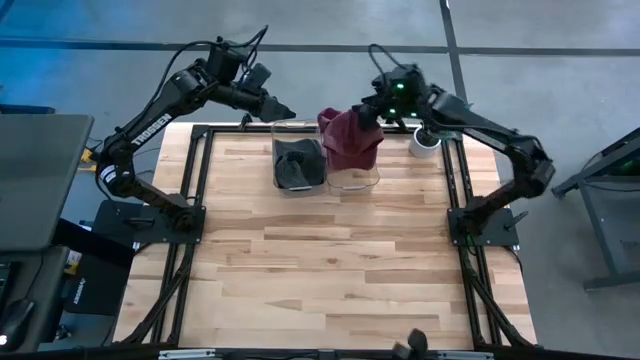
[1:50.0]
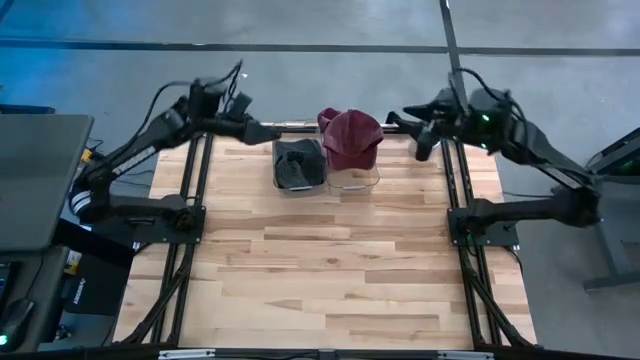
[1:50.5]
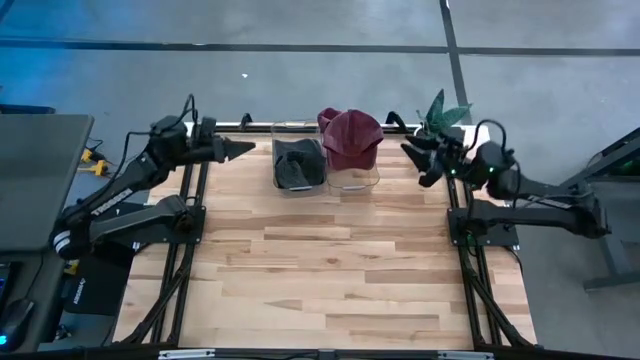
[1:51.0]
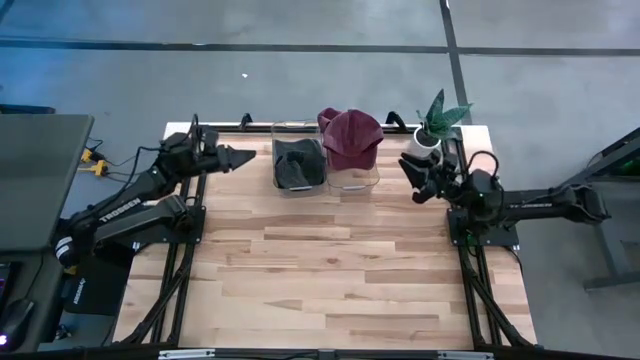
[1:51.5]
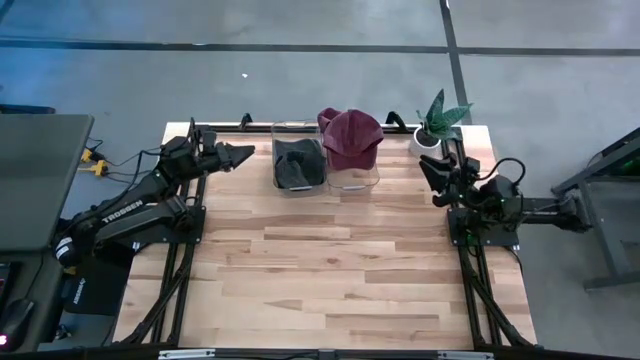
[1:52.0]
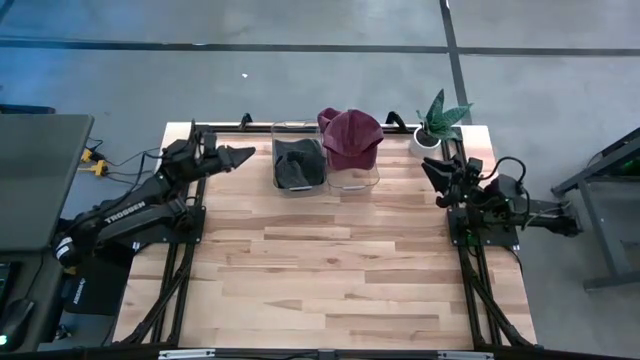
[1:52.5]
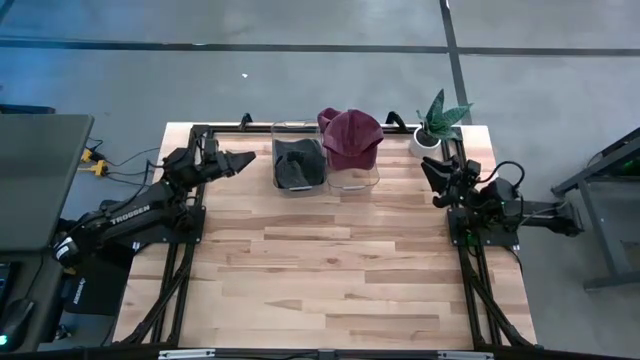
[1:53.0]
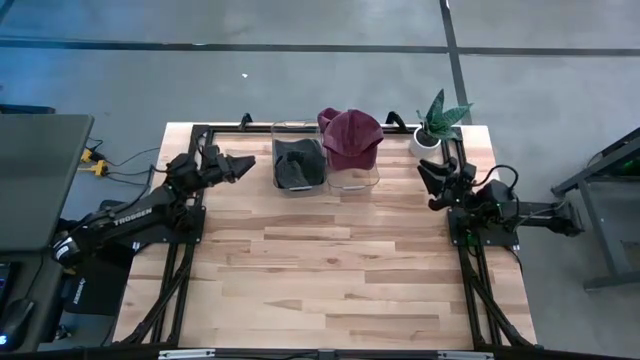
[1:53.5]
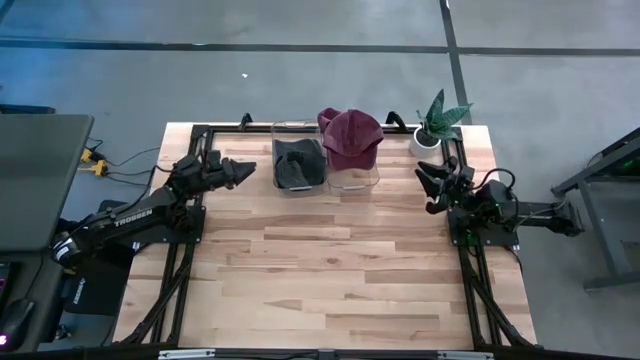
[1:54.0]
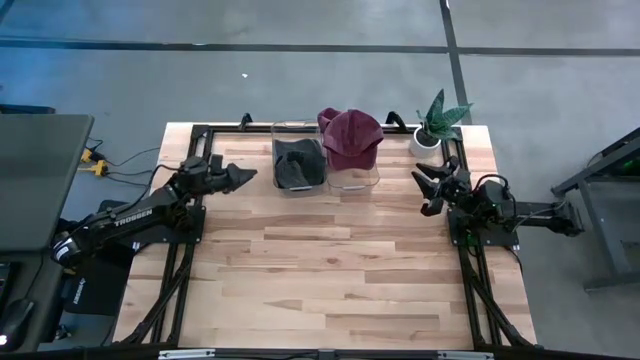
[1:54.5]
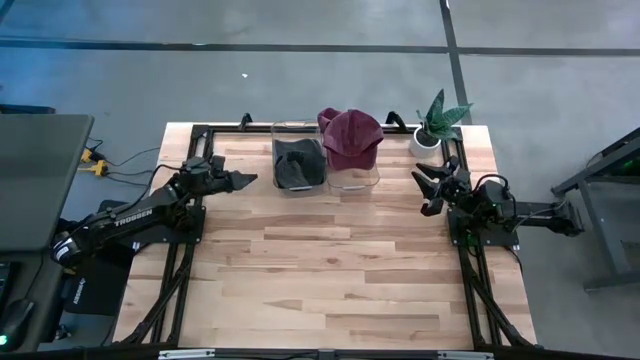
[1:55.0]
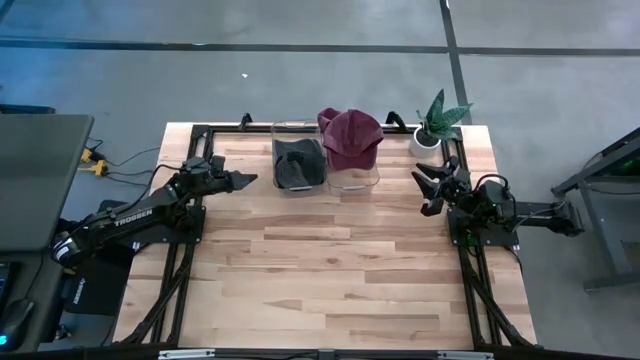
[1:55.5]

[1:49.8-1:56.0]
Task: Pick & Place hat
Return to home position

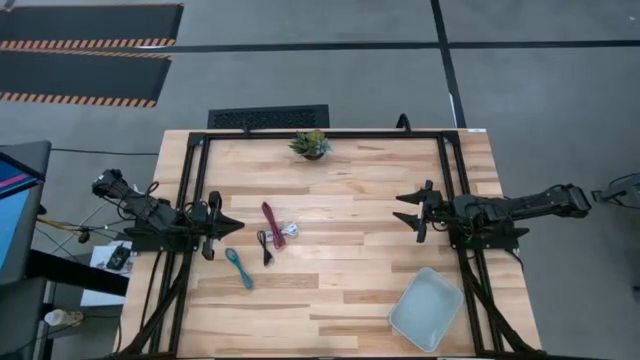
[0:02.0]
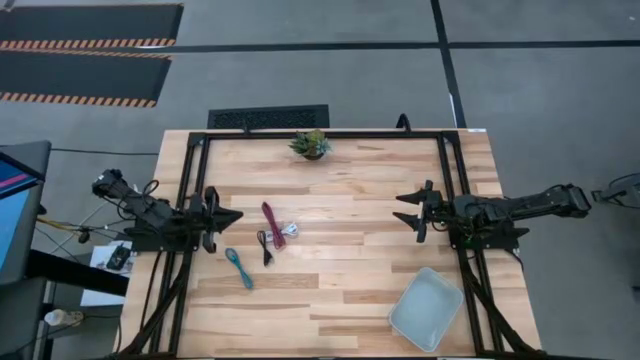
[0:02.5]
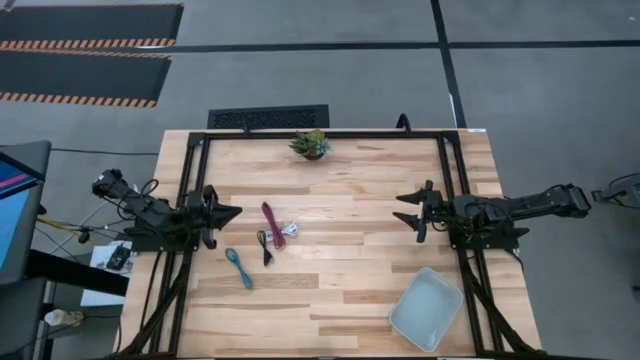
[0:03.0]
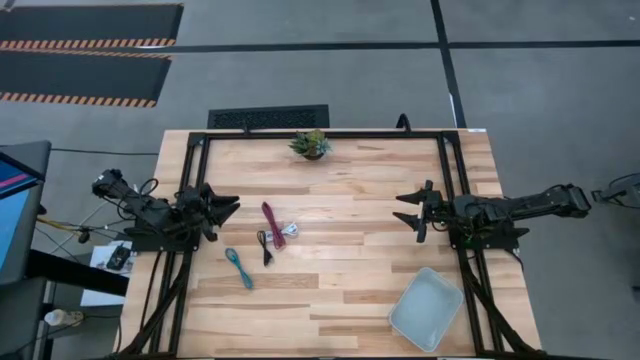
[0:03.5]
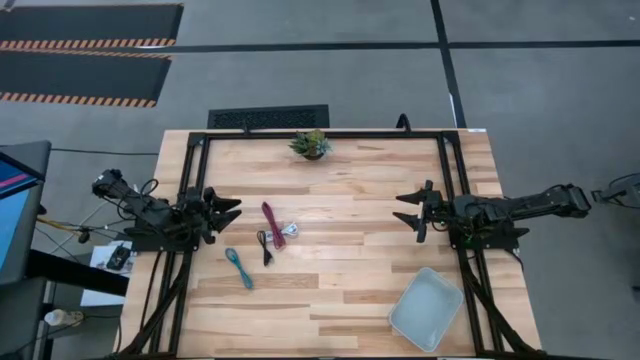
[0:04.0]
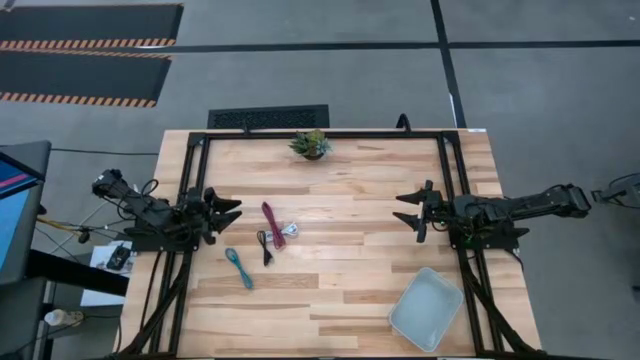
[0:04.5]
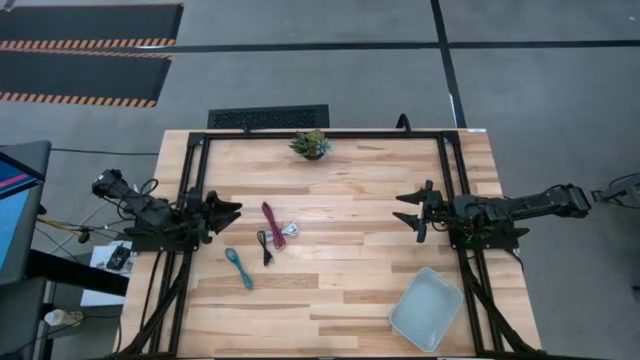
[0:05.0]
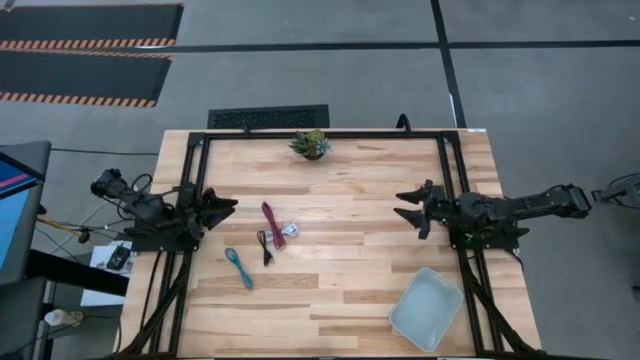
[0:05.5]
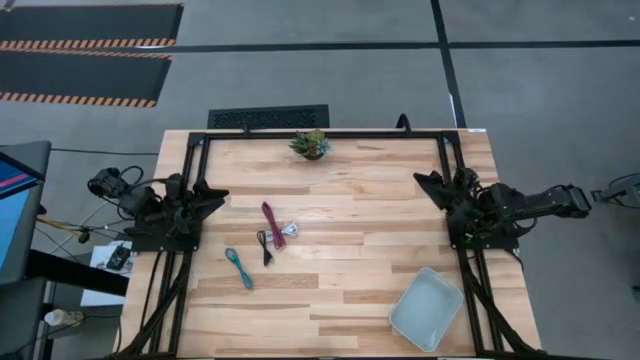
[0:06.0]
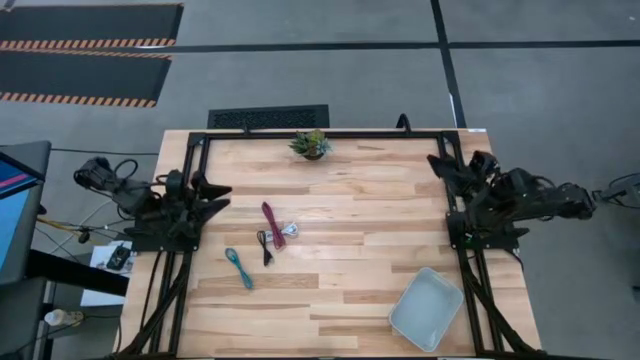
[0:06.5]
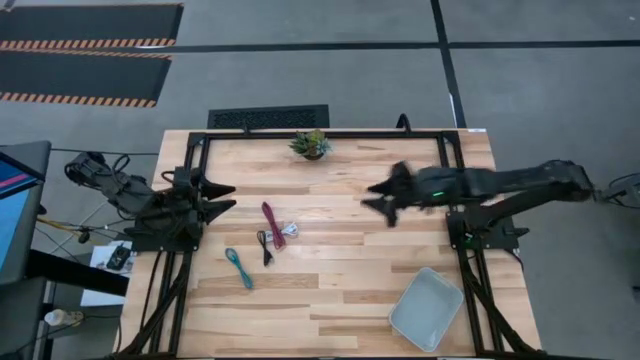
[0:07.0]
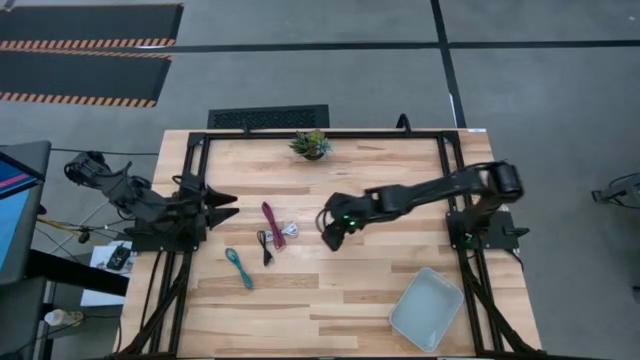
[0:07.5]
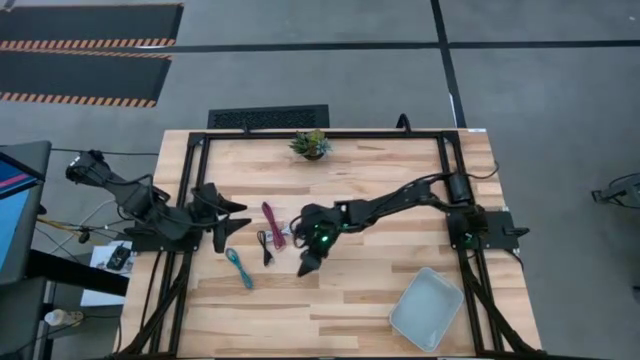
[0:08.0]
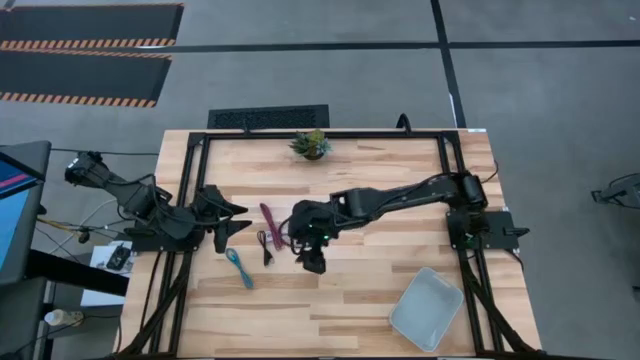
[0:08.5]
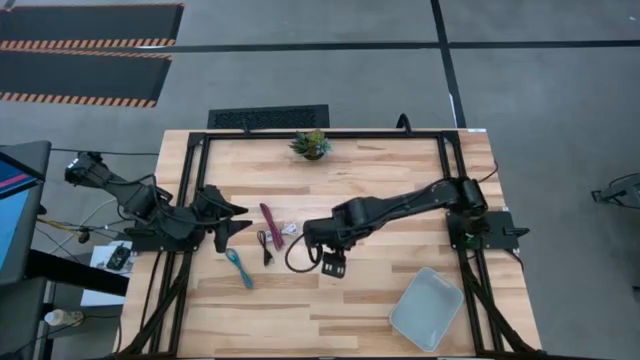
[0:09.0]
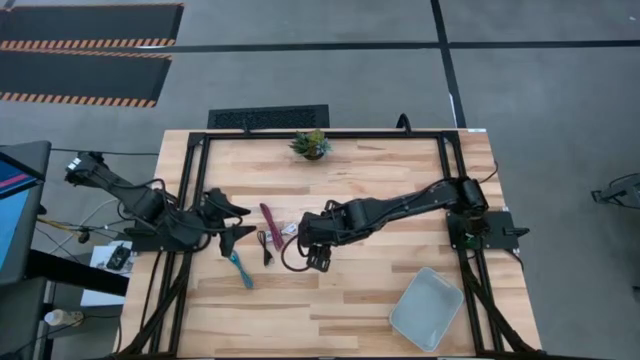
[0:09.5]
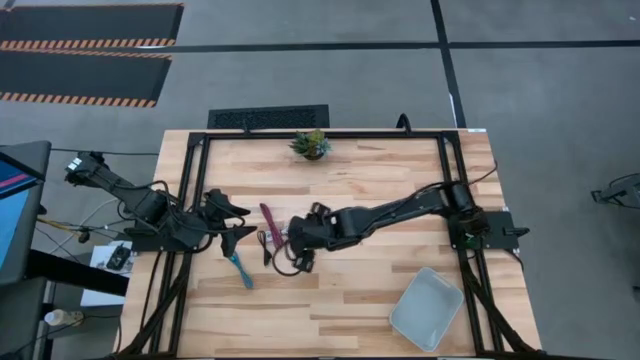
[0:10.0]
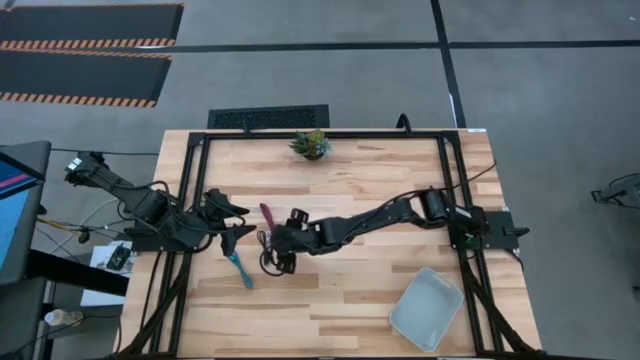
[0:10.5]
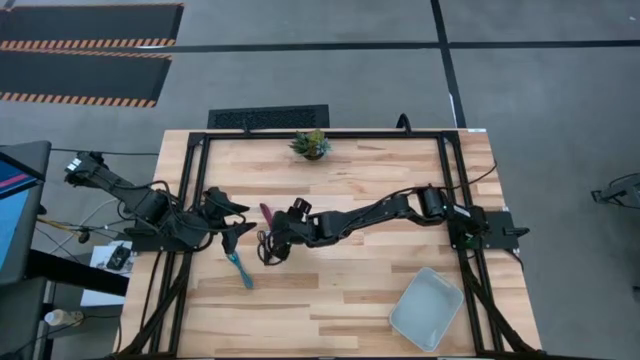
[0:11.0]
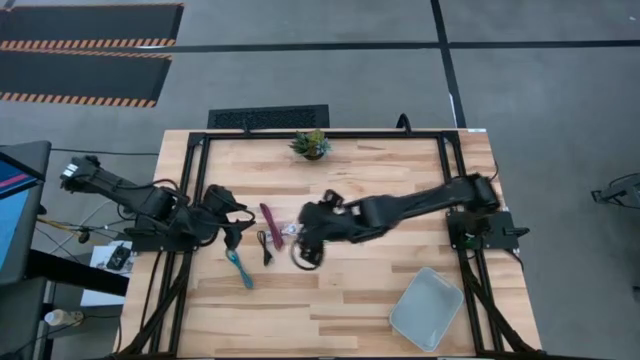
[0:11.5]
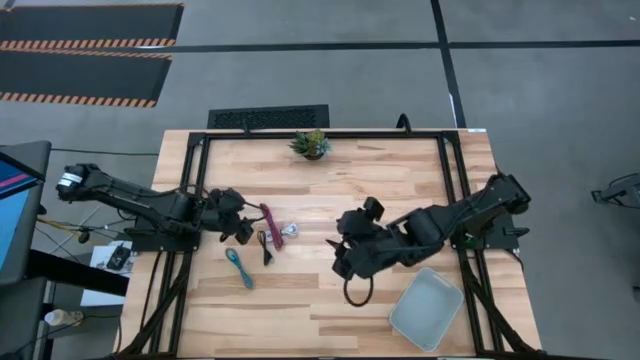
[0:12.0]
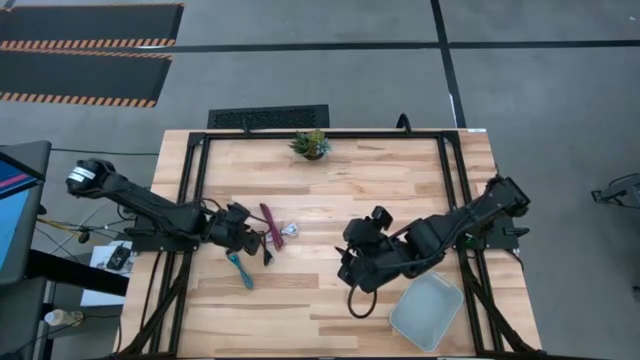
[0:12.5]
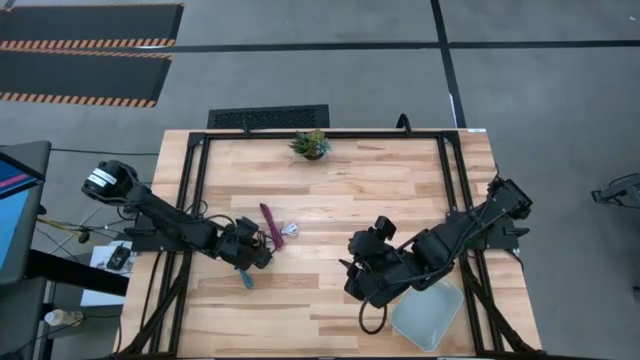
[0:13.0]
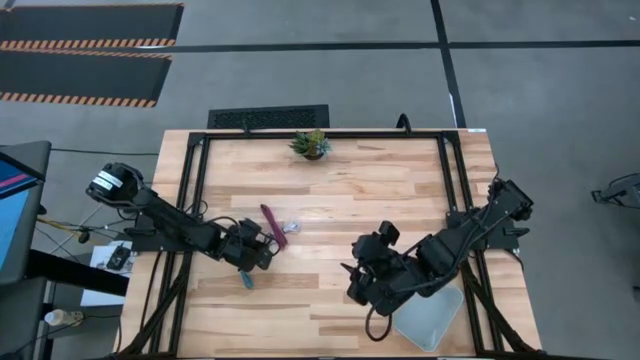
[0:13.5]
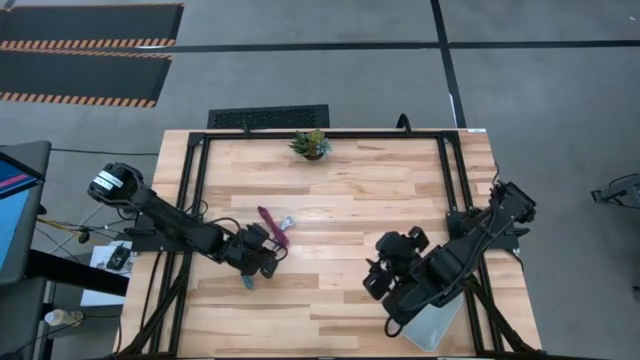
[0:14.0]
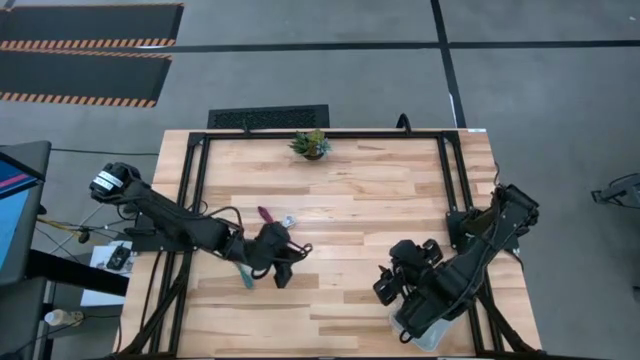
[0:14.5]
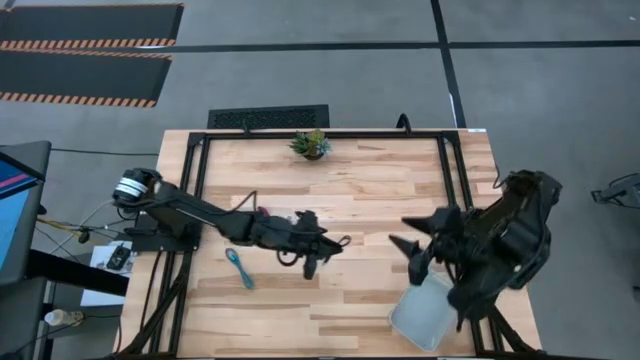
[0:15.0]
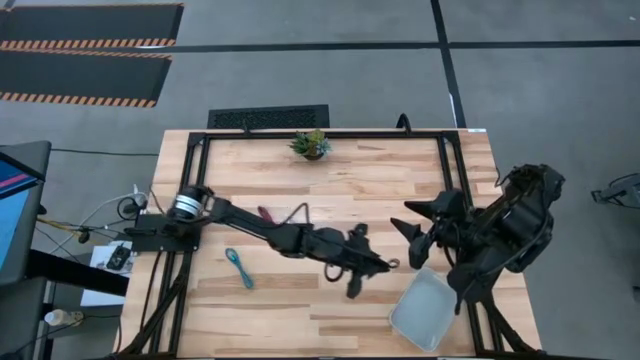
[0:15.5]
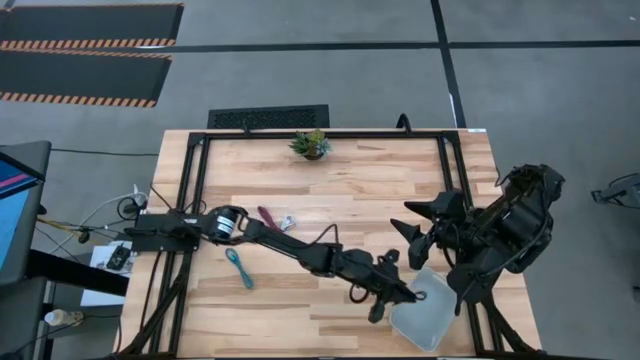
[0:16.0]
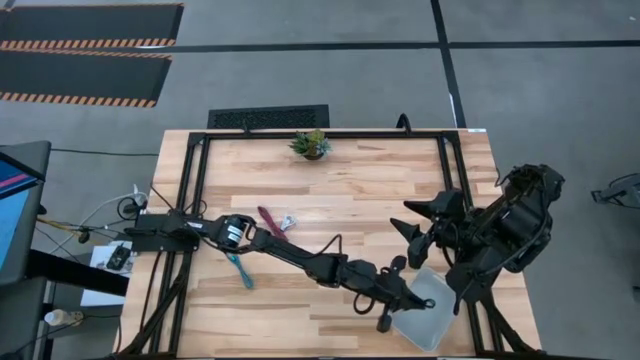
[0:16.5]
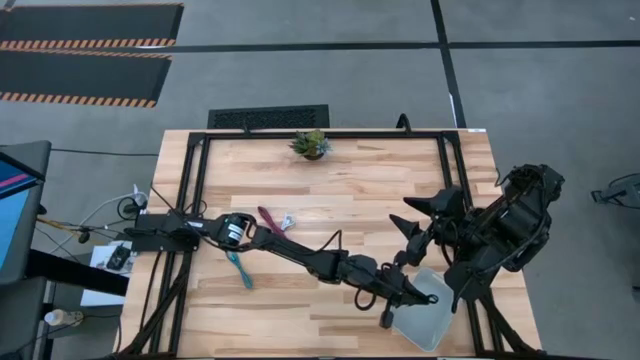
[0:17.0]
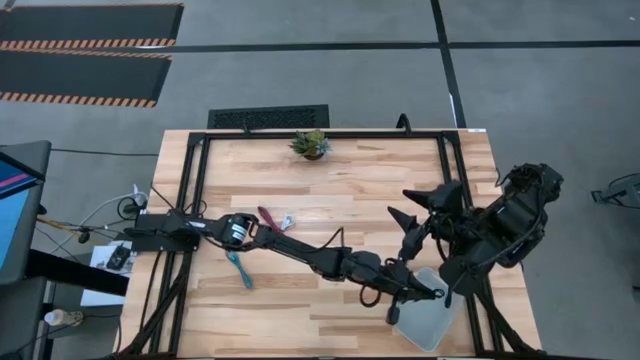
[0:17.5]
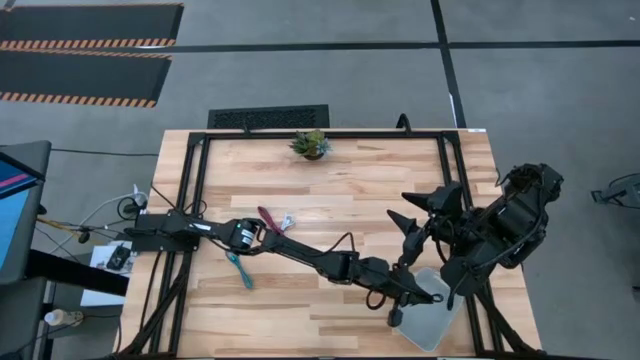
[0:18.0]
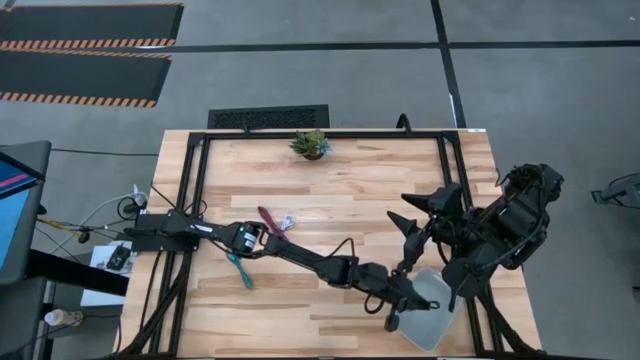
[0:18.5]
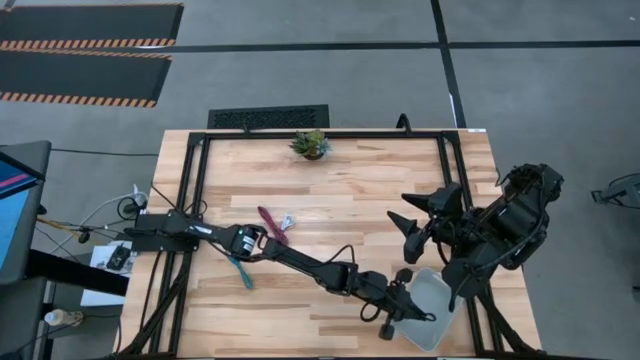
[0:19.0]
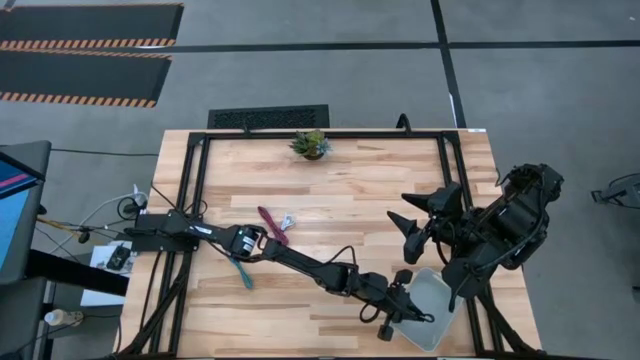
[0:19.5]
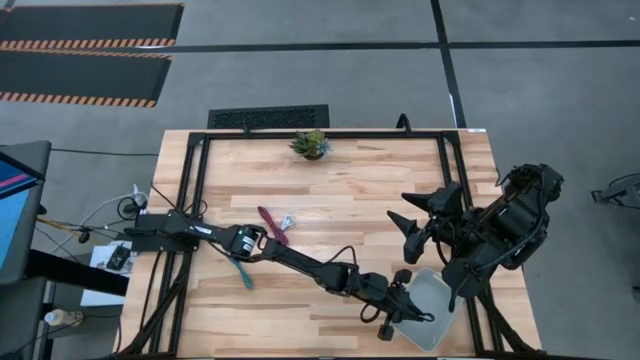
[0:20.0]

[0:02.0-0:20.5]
Task: Pick and place USB-C Cables
Put the black charger cable into the white bin
